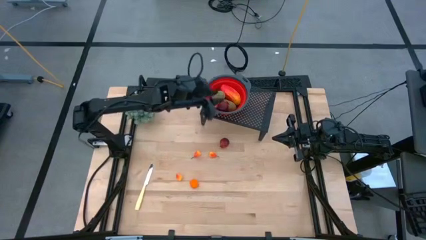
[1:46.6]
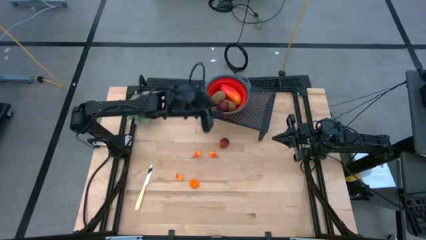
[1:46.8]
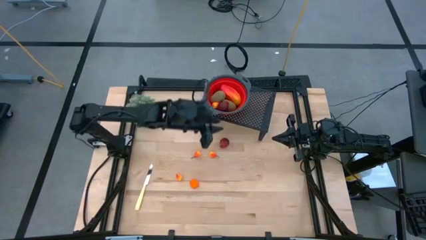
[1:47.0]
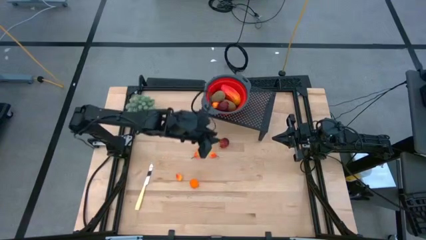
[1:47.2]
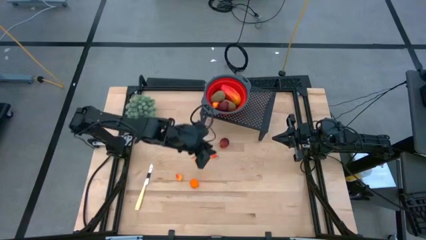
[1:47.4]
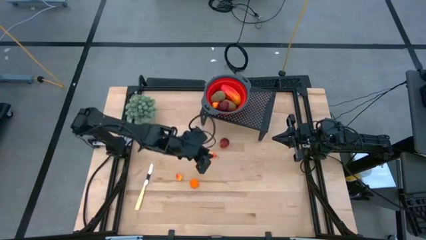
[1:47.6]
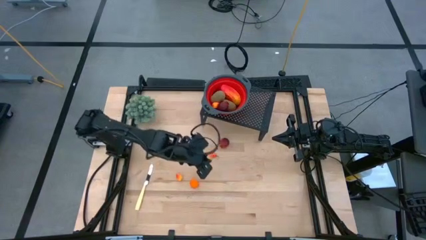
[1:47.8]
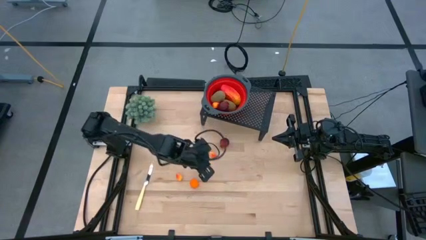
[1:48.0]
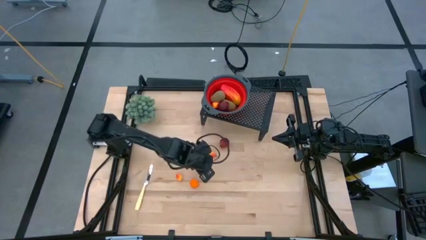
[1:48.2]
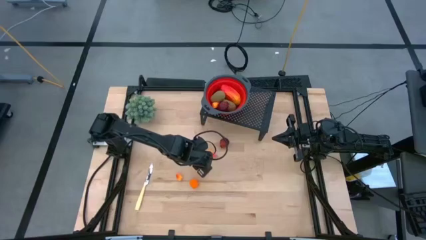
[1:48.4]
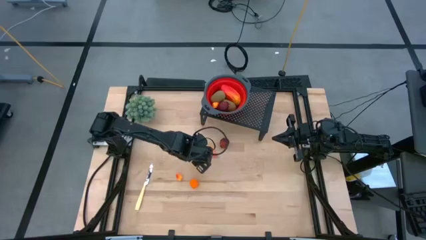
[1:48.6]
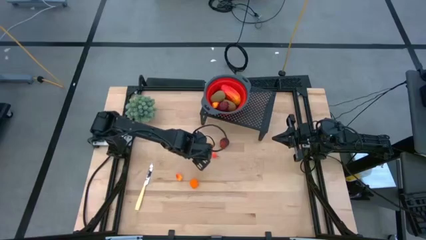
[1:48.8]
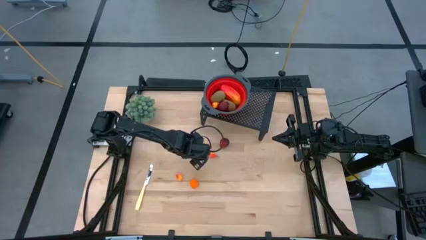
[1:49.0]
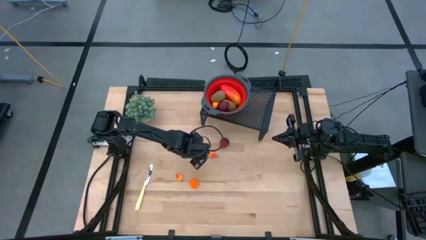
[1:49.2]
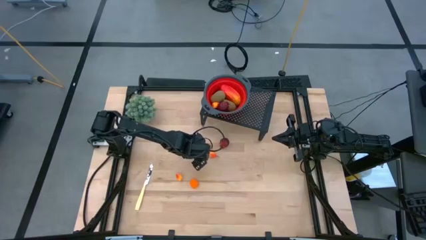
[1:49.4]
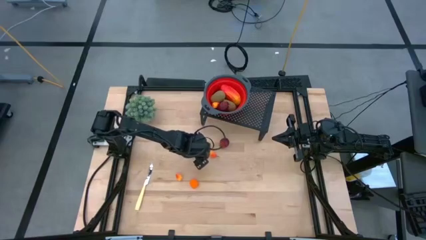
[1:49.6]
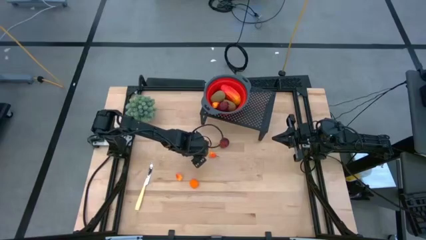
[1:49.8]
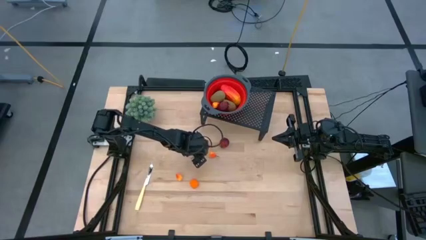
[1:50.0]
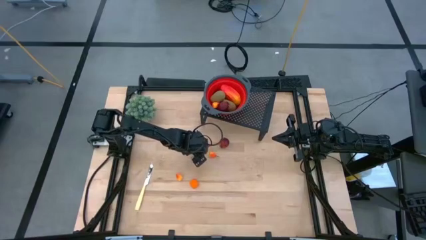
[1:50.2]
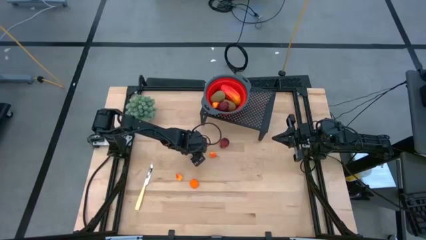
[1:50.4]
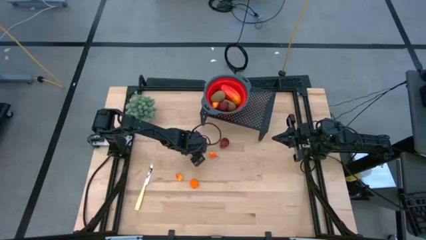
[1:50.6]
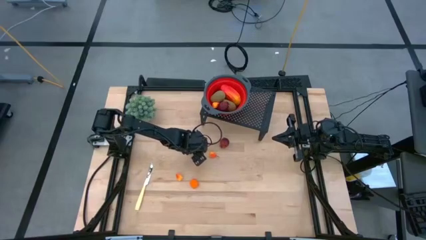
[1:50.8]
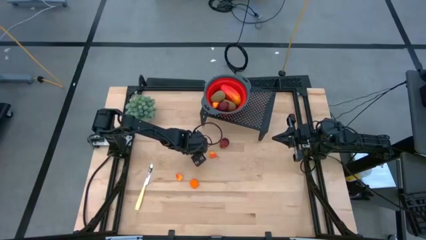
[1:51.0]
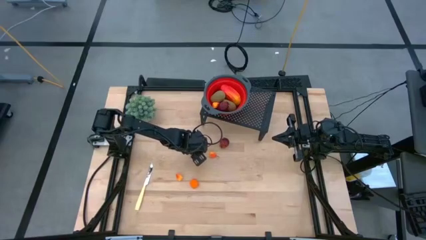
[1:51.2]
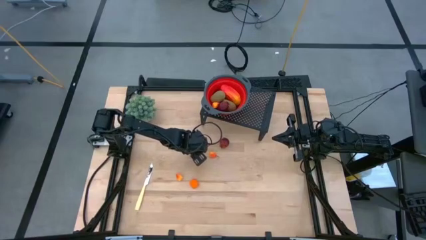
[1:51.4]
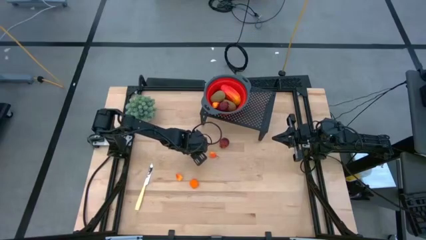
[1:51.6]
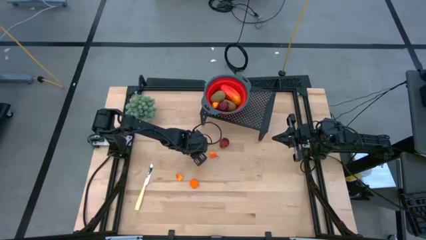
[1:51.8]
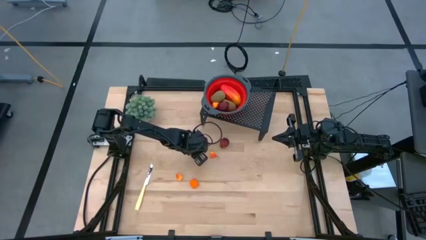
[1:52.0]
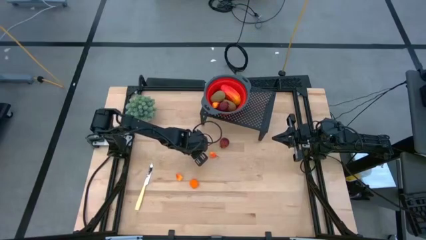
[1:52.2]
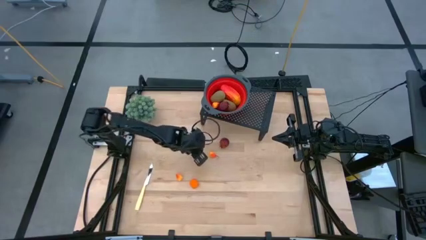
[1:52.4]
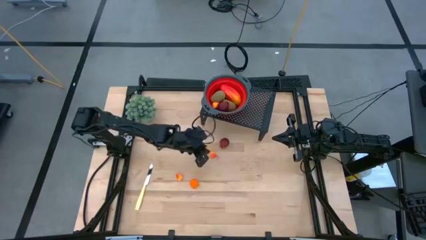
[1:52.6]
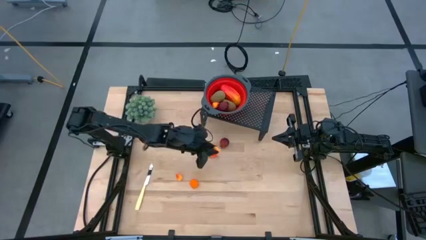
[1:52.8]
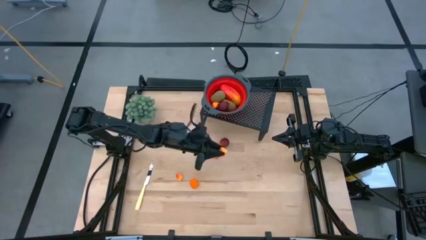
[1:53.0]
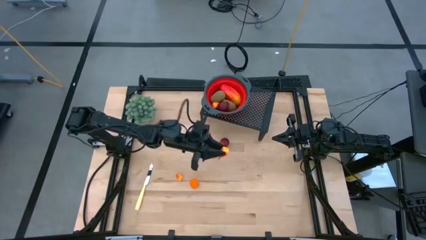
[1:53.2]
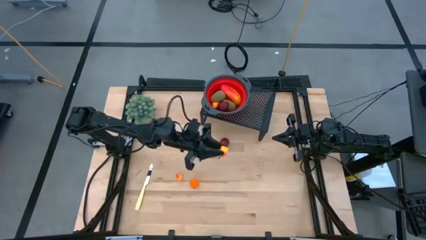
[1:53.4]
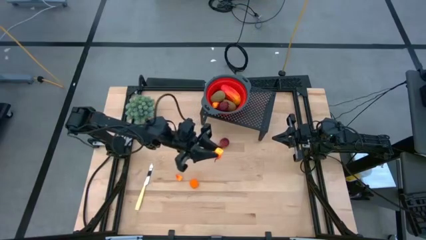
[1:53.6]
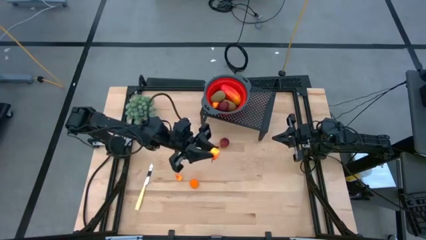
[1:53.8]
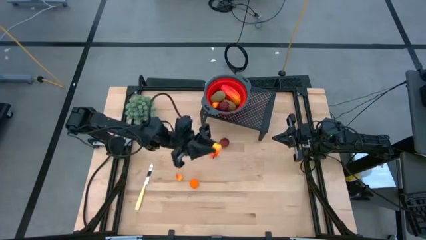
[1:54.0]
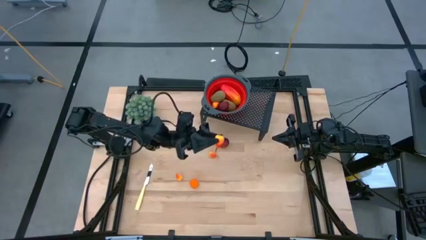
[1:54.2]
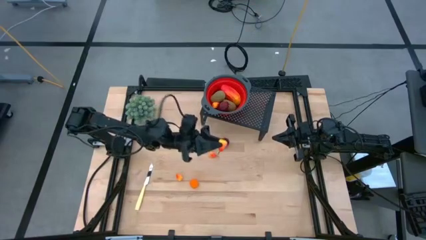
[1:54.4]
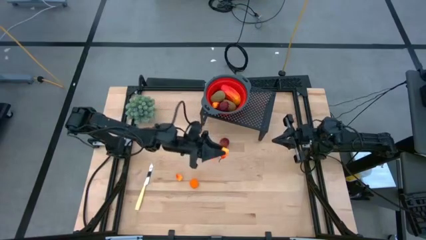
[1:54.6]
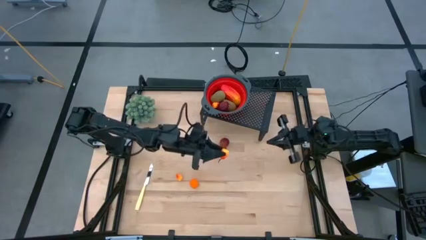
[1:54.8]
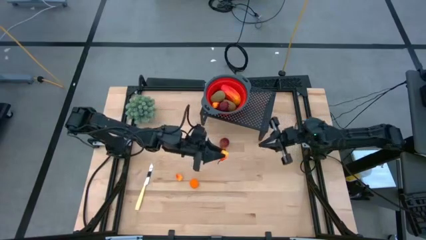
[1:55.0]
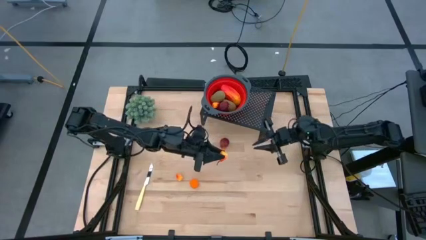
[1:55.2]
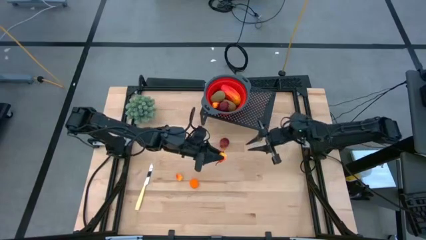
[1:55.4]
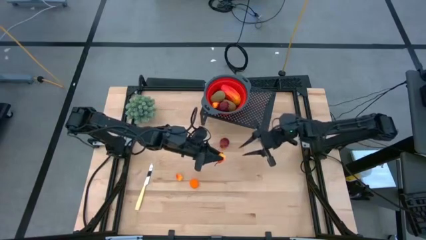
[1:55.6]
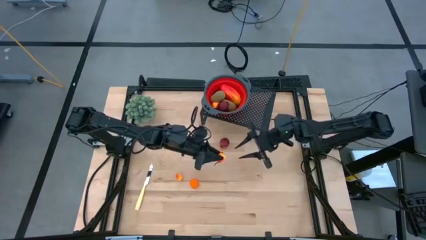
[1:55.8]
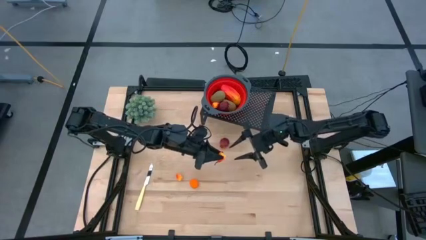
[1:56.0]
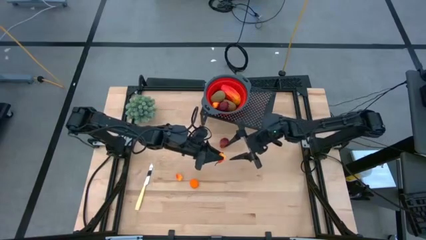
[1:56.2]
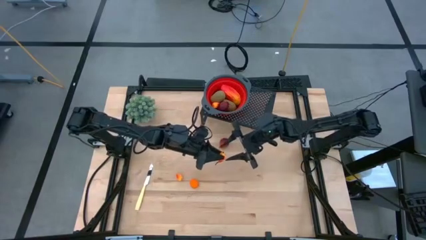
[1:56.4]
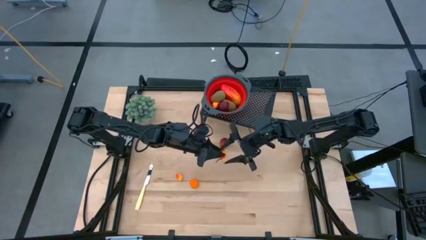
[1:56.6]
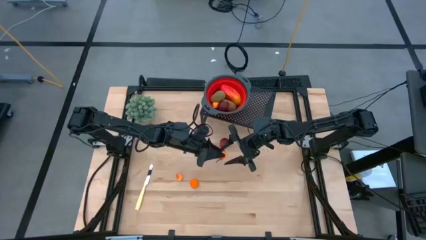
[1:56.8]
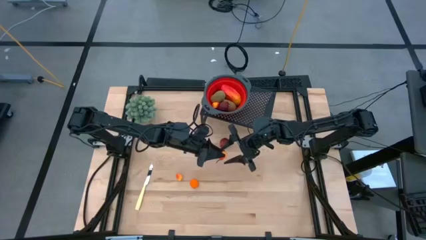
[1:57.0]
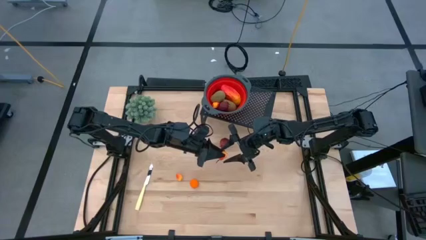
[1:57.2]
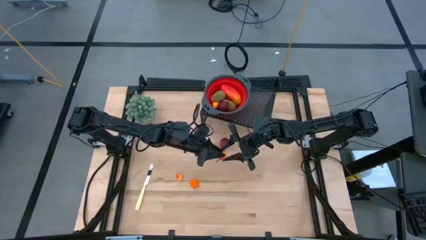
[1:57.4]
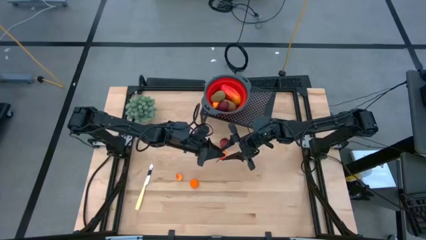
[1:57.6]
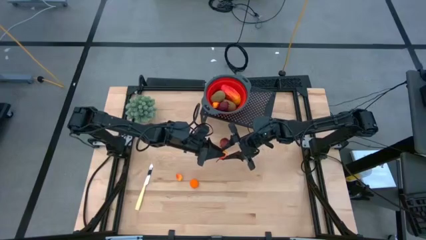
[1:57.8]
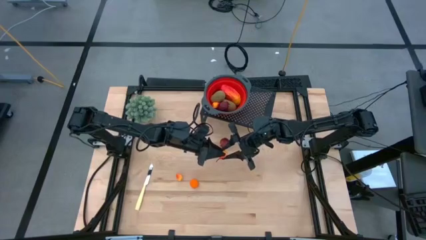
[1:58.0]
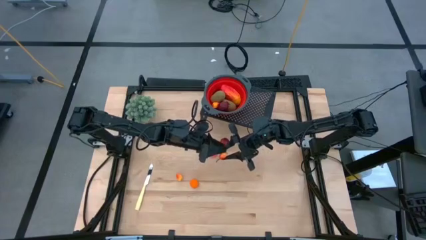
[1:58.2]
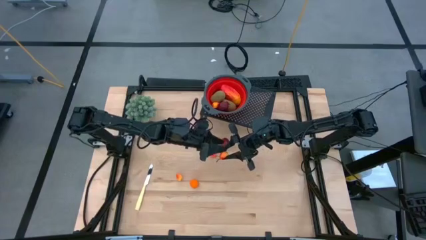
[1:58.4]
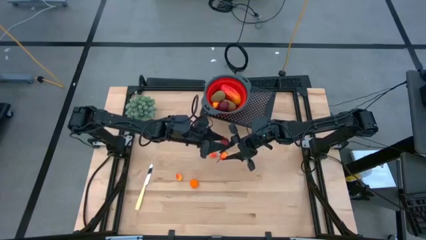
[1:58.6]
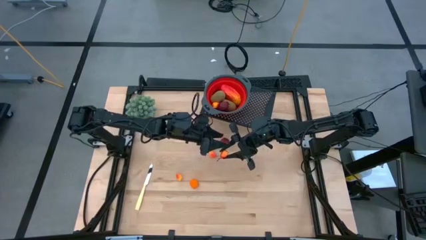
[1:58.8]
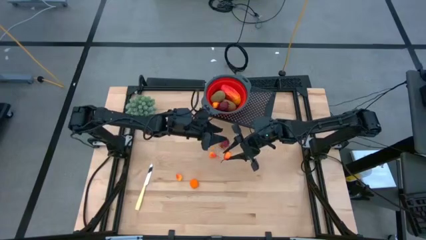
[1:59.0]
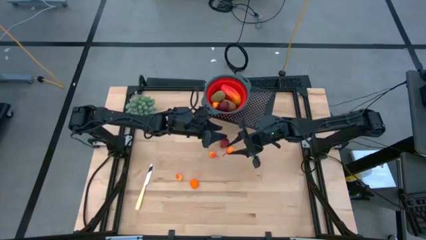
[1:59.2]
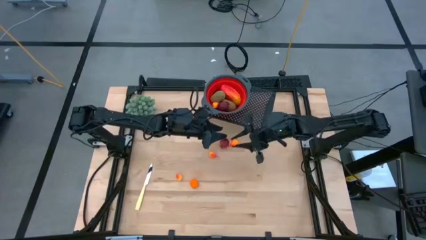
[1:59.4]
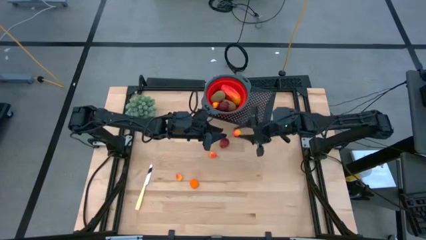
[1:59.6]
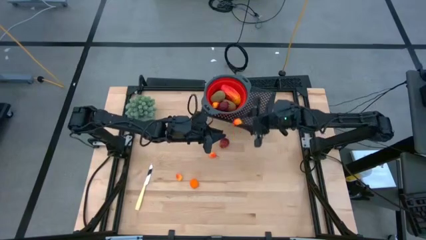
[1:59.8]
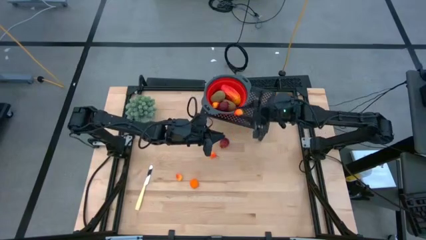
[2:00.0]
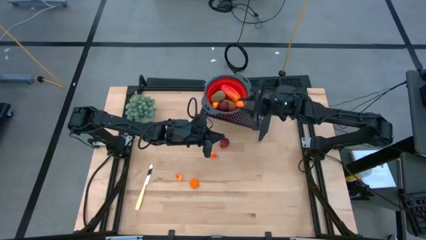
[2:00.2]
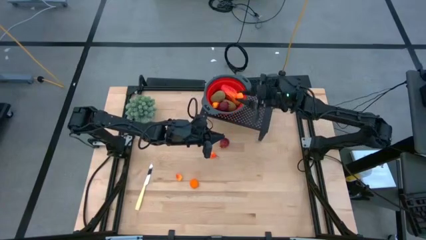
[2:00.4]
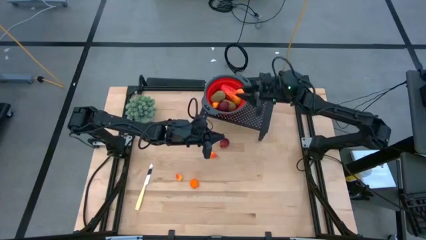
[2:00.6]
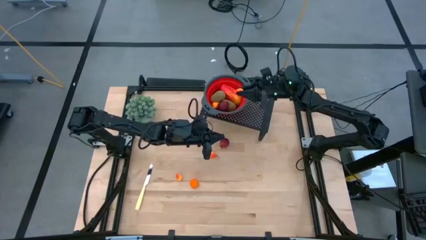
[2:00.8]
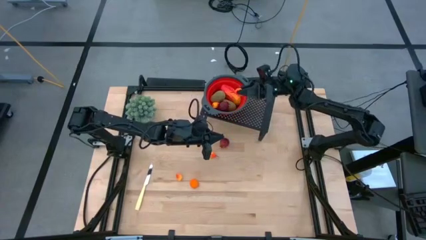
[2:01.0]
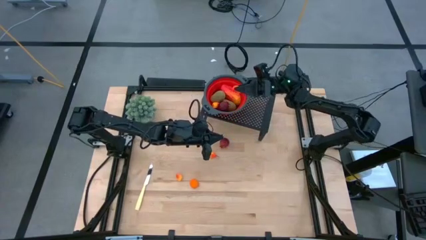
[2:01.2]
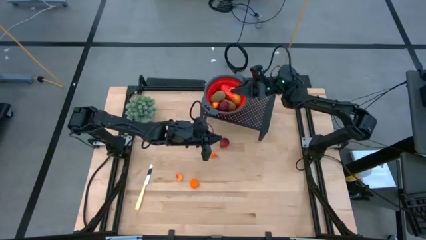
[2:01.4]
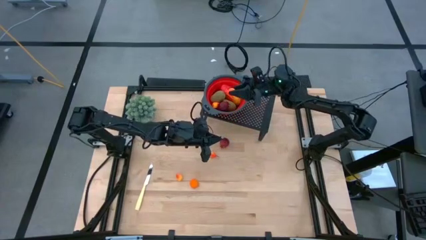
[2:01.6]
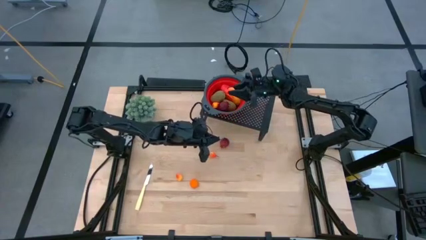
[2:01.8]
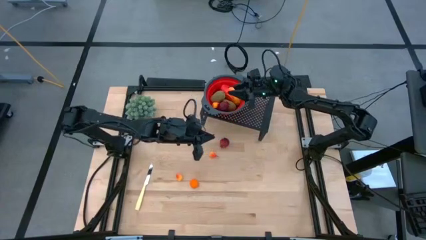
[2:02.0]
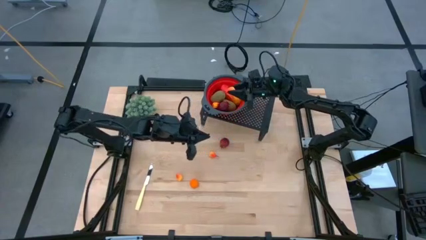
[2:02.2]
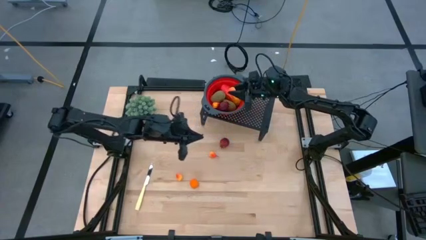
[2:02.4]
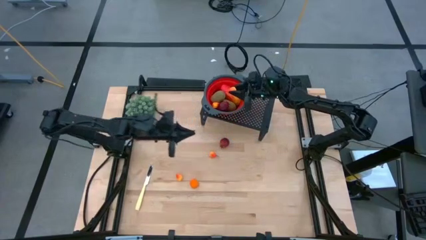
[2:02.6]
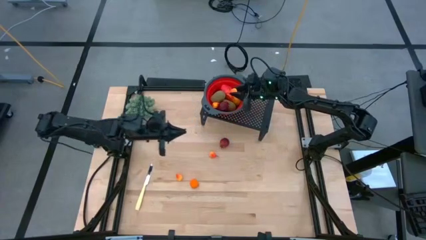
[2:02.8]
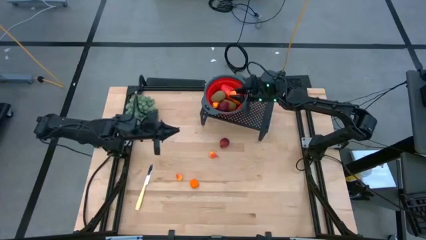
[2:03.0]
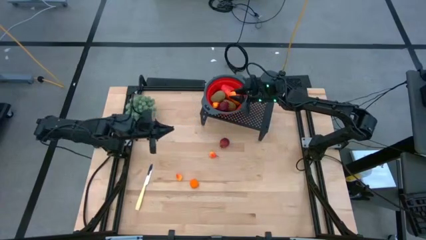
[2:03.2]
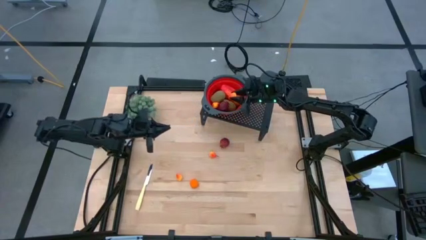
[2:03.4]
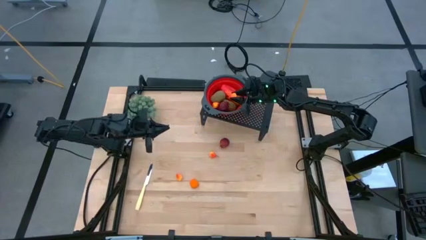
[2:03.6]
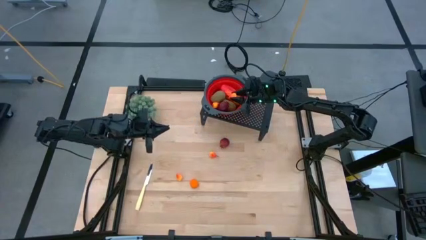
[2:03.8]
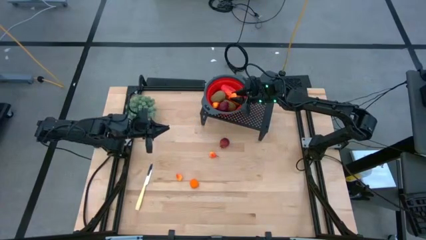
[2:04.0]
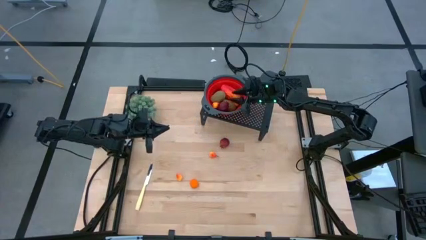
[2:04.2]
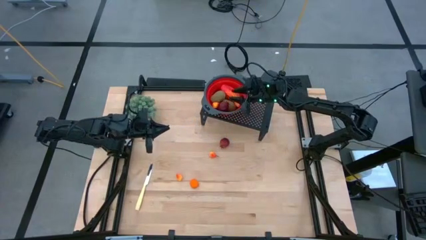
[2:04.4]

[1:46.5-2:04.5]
Task: Pick & Place Fruit
Put the pear into the red strainer bowl on the shelf
